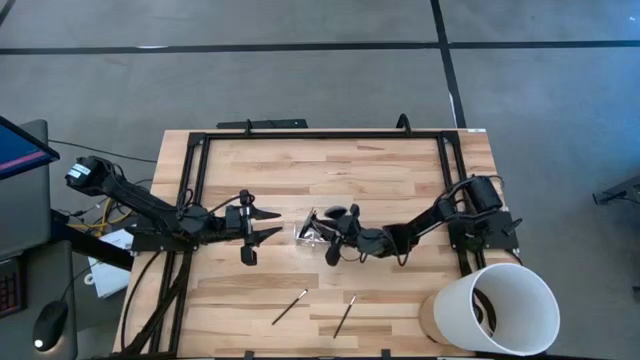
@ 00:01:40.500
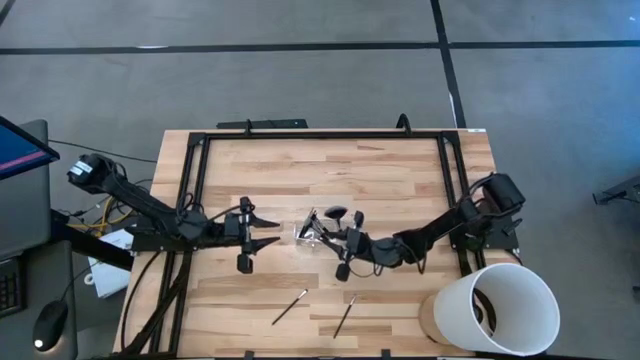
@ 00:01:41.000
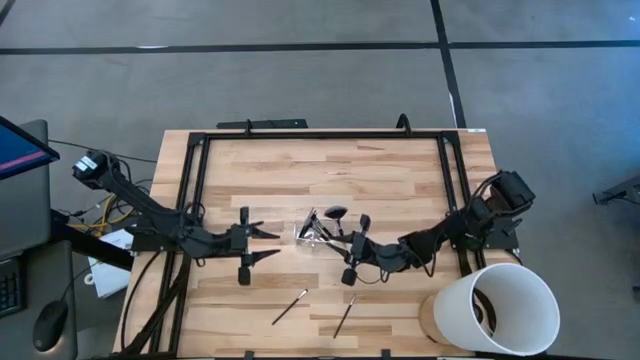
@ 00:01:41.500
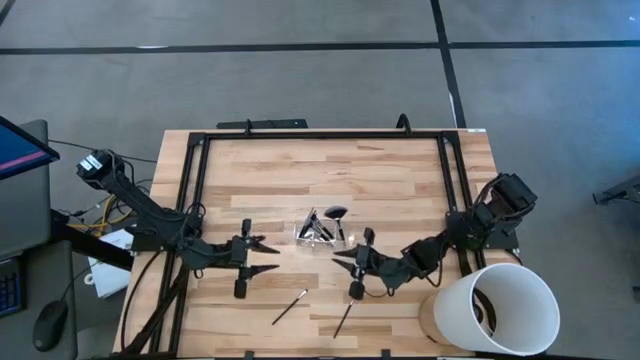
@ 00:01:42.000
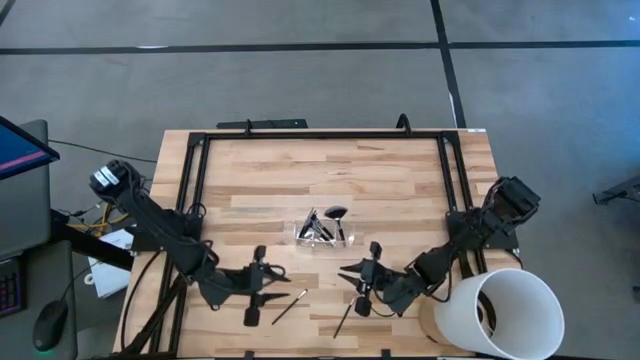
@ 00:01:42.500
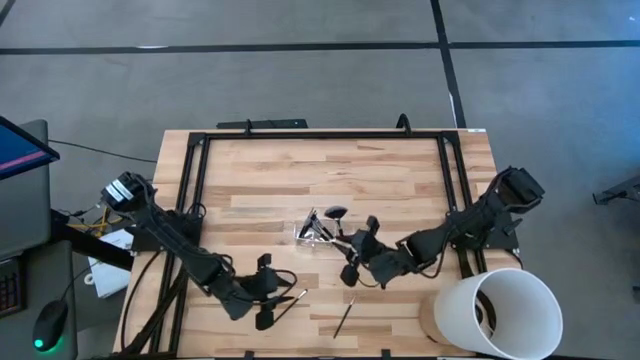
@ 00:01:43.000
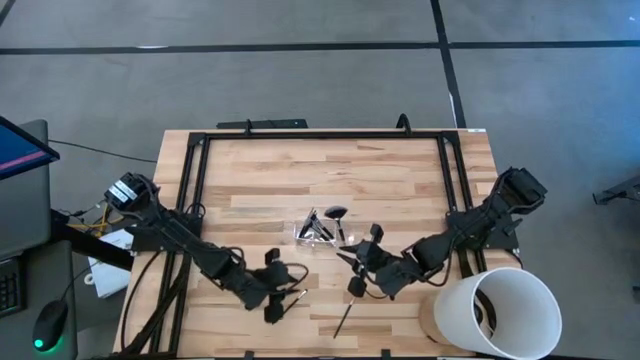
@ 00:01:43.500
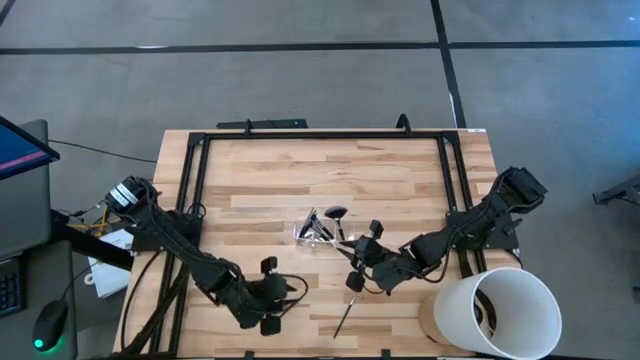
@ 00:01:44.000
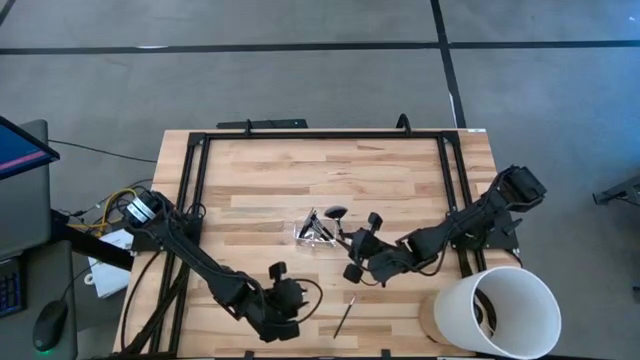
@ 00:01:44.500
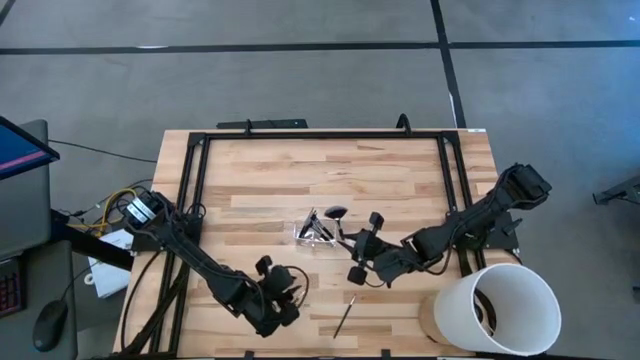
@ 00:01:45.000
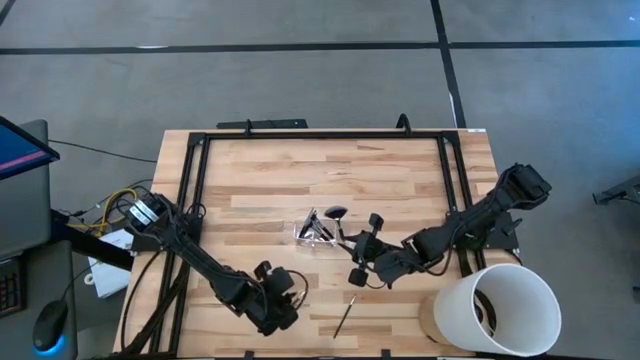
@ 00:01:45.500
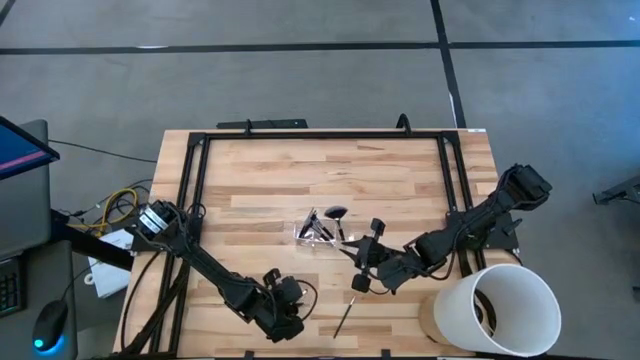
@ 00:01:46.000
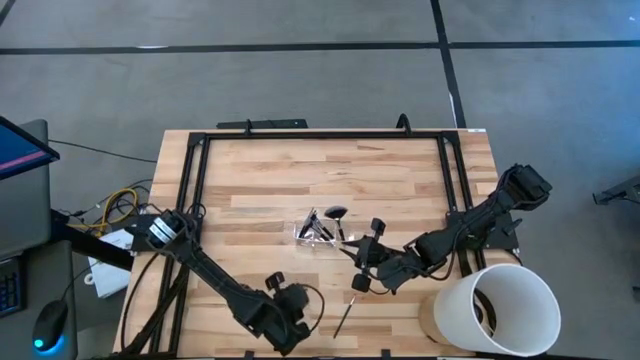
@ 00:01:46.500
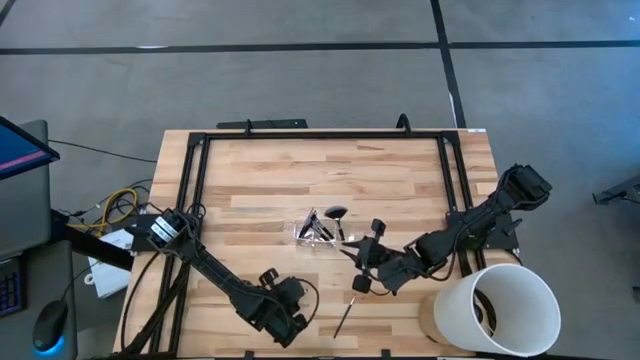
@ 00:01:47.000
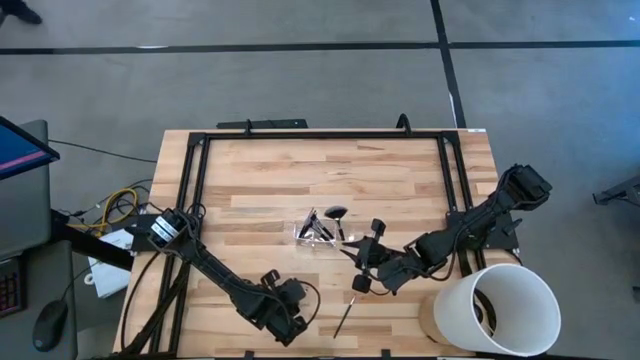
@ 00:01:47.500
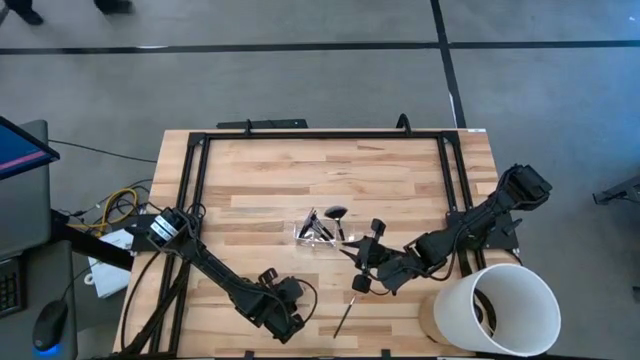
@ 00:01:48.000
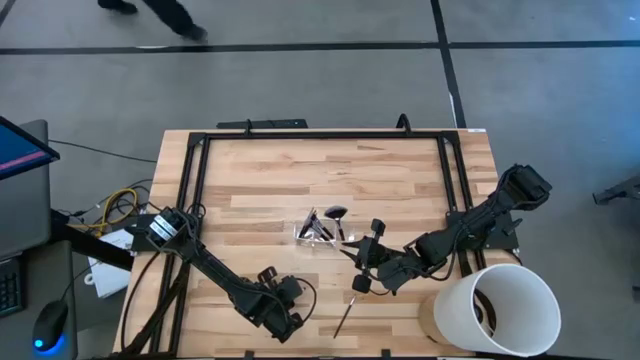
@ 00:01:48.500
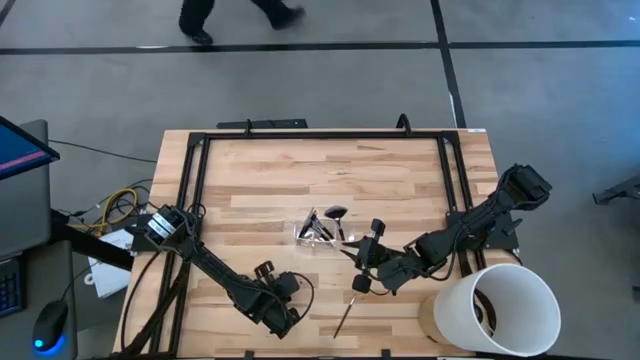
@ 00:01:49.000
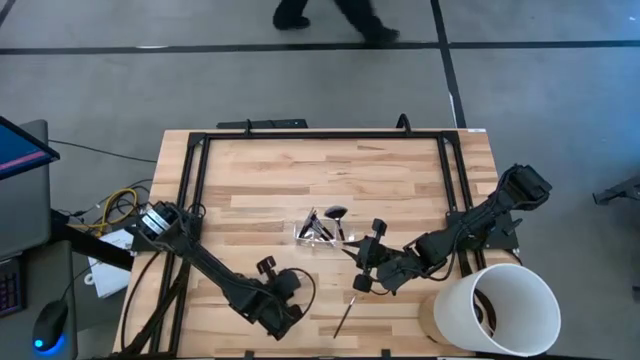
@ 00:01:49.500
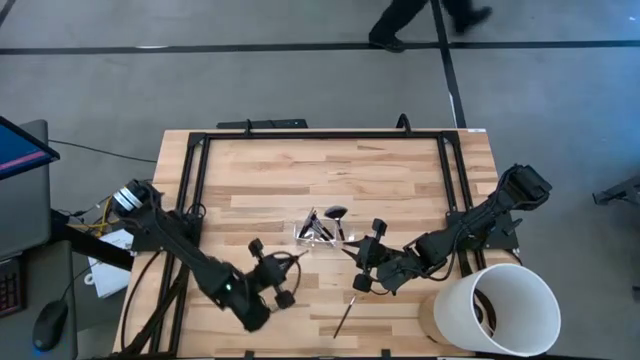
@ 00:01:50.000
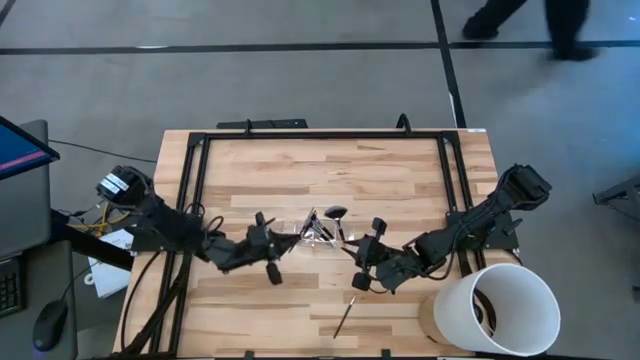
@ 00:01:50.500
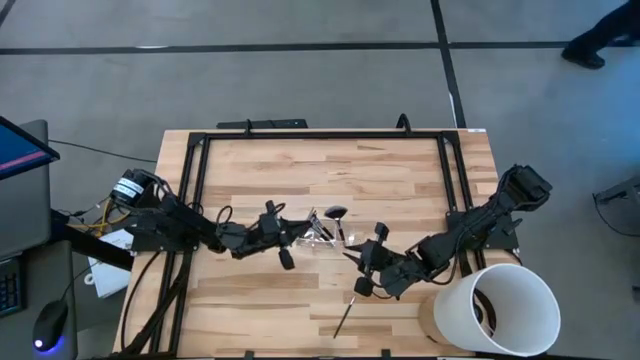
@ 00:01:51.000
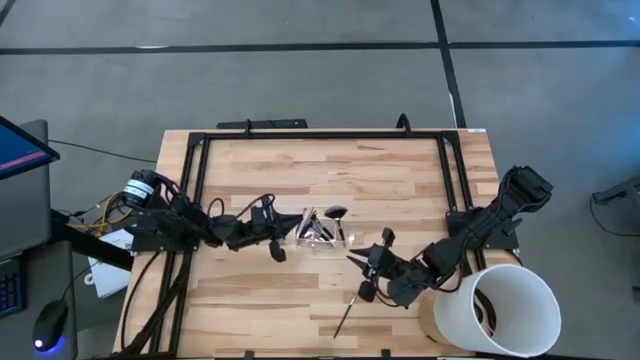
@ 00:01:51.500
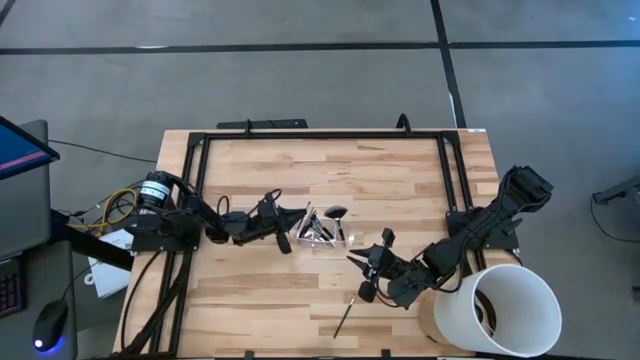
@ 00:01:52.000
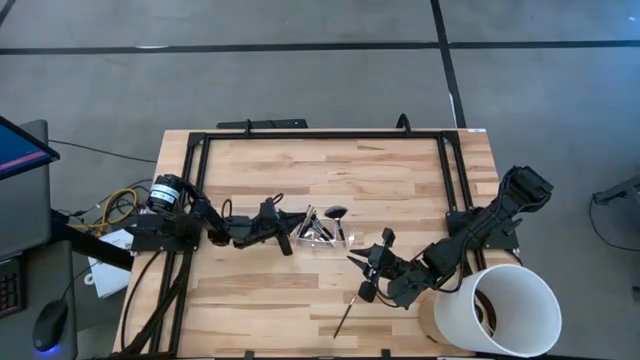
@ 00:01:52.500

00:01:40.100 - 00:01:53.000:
Task: Put items in baskets/containers
Put the eyeshadow brush into the left section of the transparent organizer

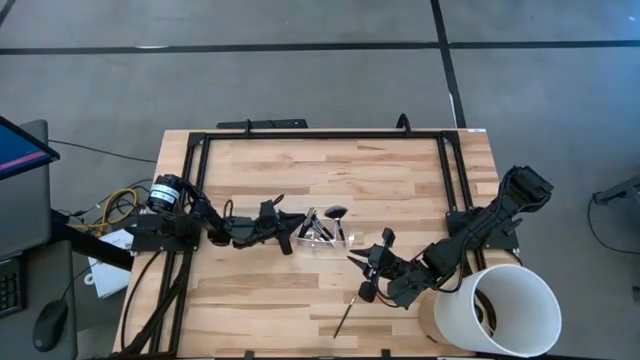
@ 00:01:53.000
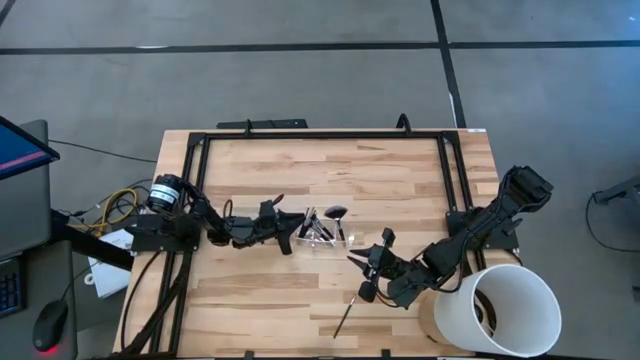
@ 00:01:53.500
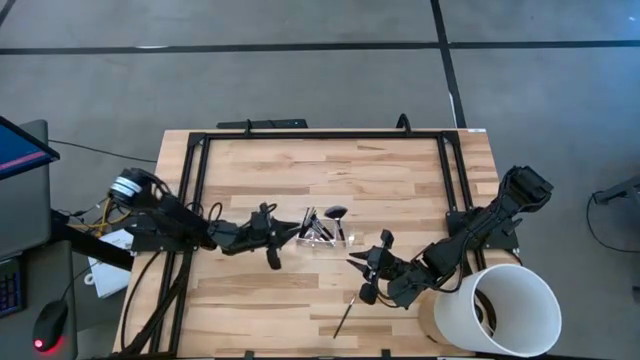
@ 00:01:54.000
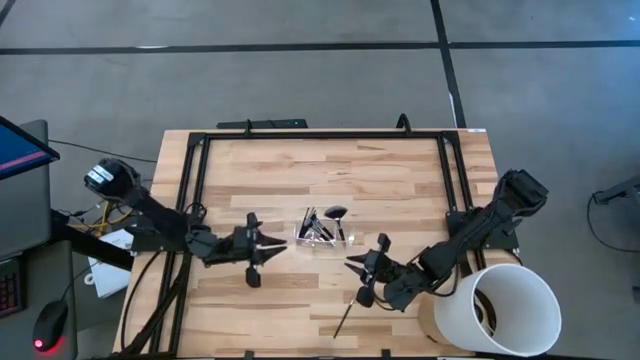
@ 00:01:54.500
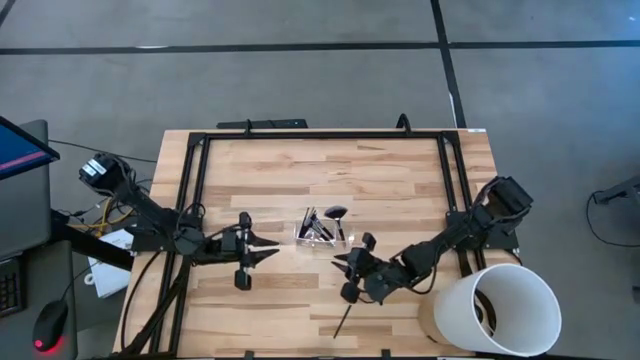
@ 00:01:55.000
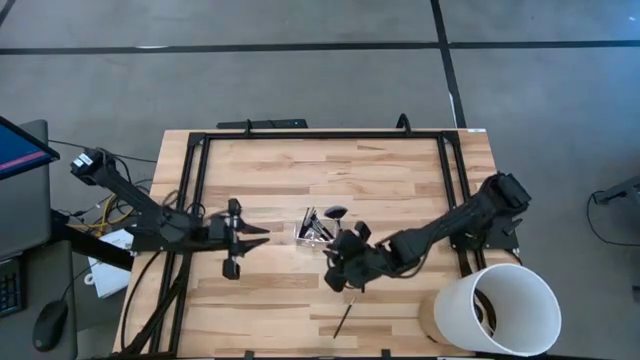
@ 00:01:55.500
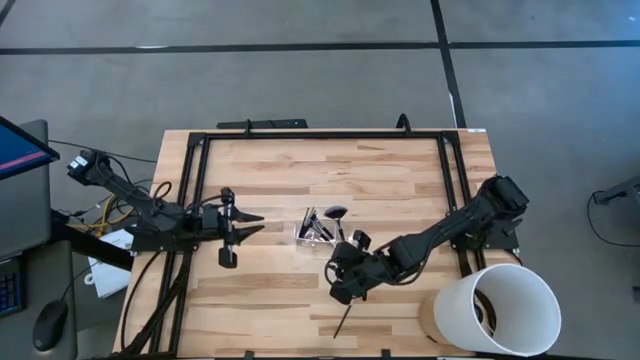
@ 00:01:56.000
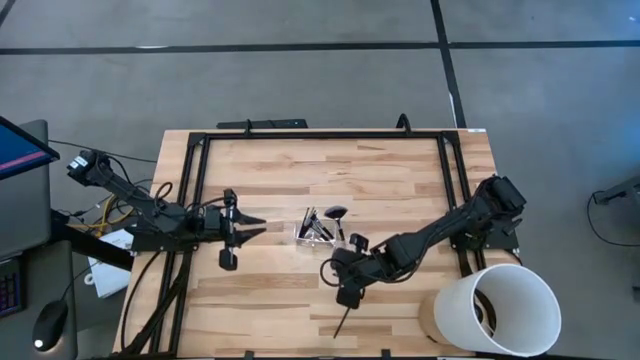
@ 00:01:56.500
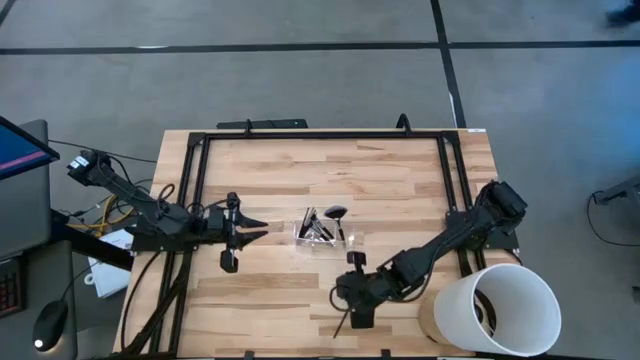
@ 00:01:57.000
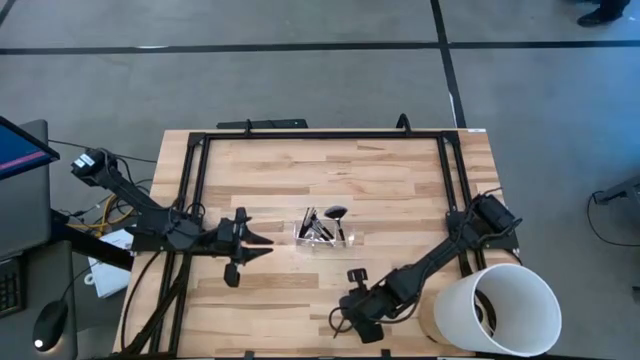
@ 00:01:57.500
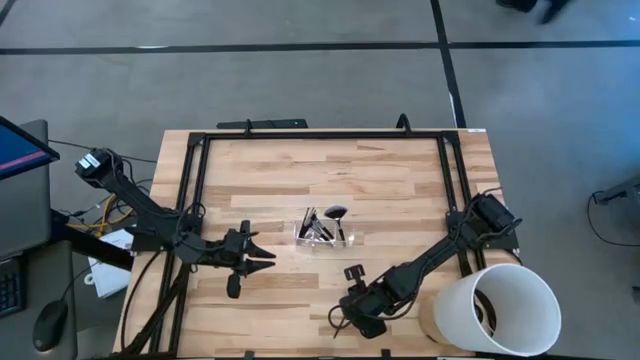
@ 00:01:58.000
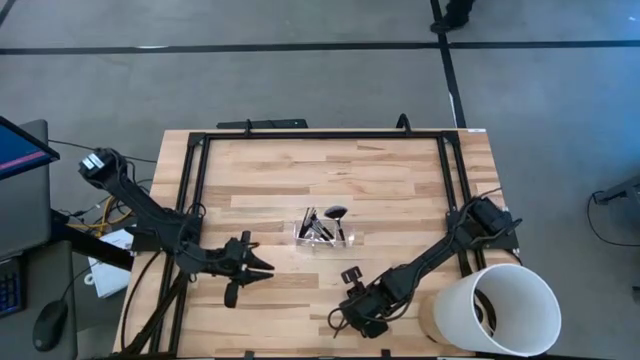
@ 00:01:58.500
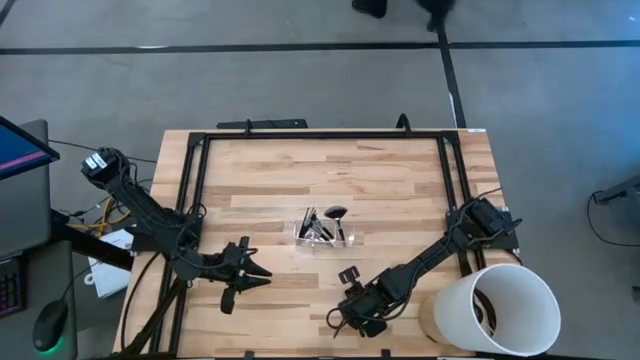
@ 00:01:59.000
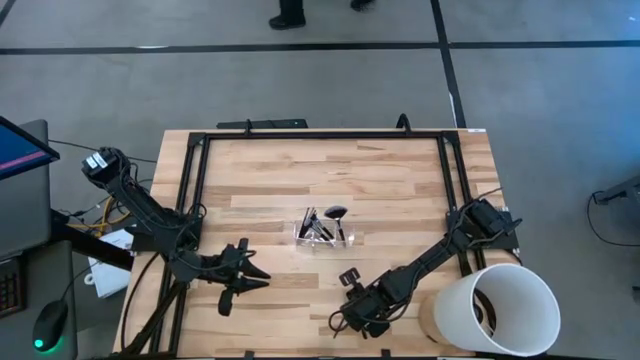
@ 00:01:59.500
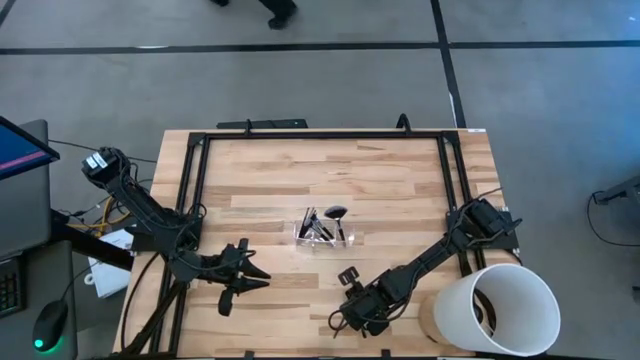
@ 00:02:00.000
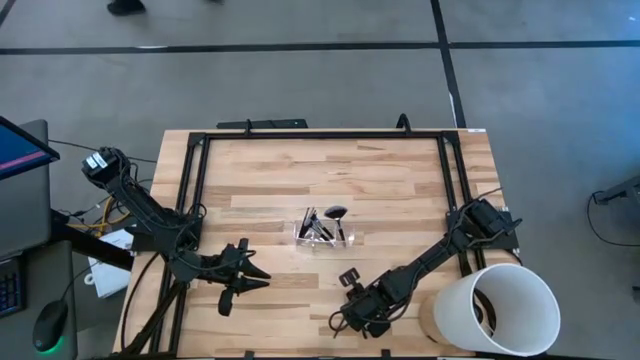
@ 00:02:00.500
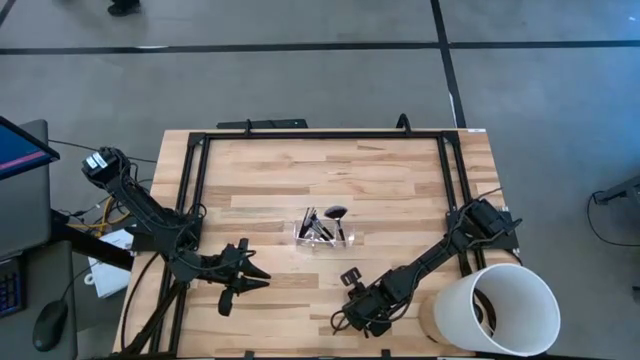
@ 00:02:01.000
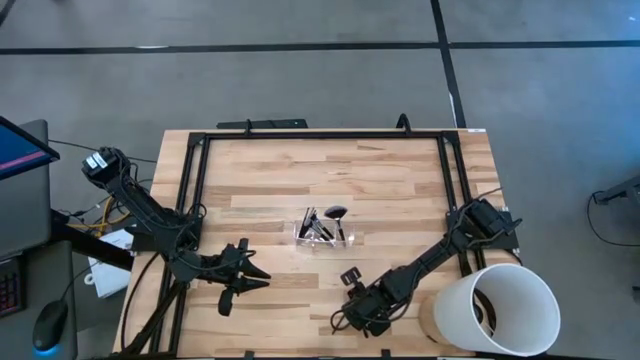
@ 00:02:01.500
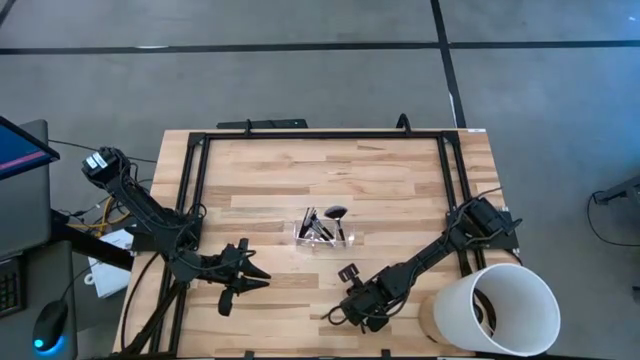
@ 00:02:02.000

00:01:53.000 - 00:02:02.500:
Put the liner brush into the left section of the transparent organizer
